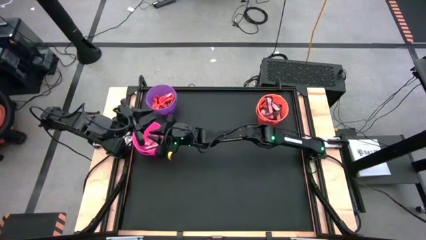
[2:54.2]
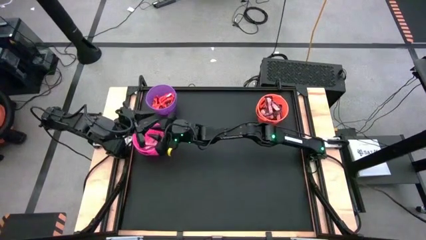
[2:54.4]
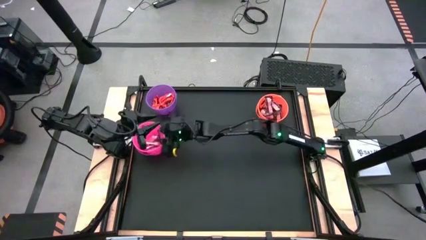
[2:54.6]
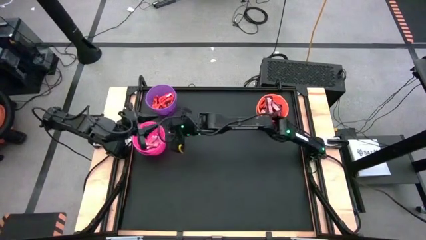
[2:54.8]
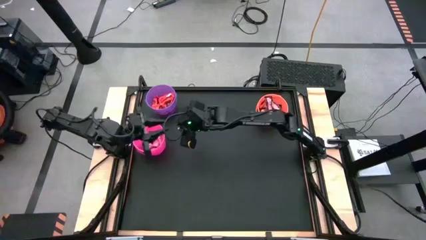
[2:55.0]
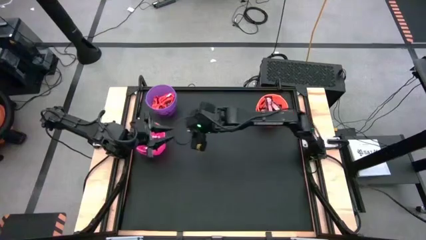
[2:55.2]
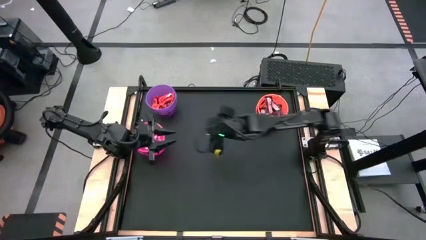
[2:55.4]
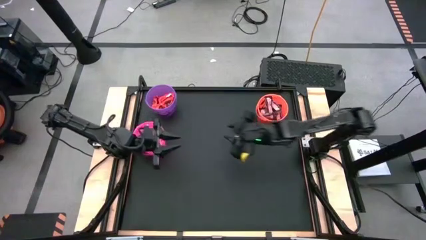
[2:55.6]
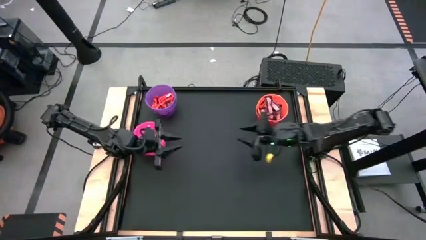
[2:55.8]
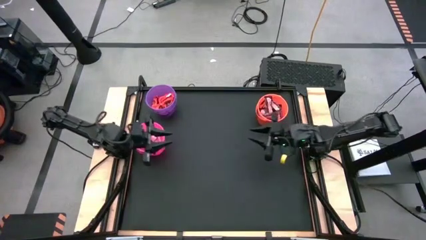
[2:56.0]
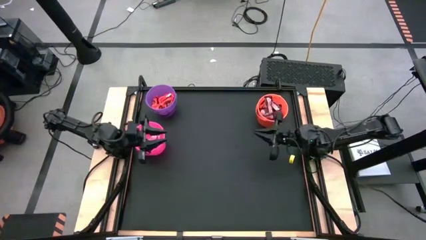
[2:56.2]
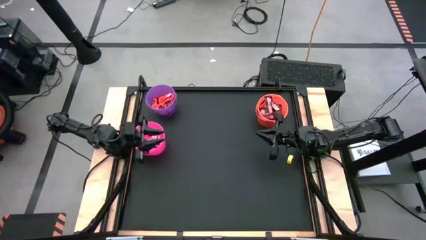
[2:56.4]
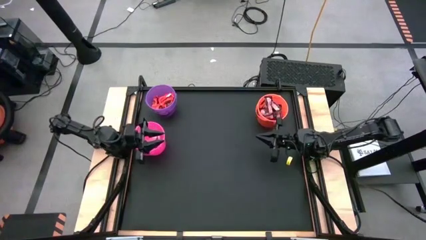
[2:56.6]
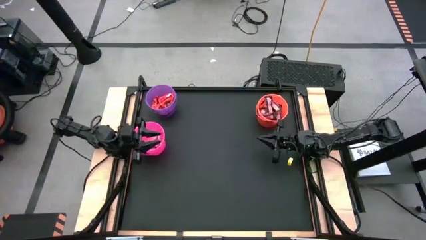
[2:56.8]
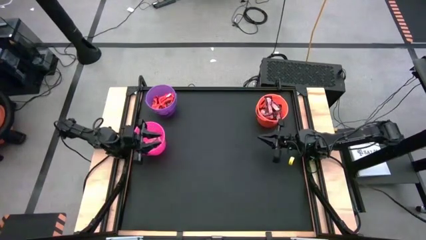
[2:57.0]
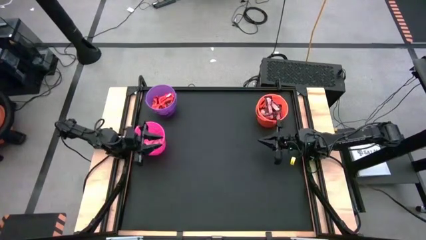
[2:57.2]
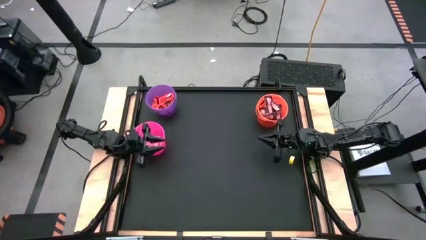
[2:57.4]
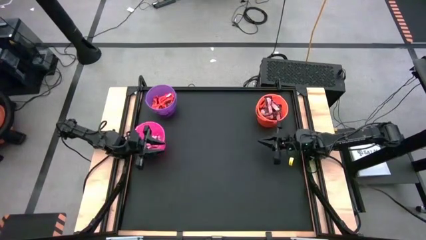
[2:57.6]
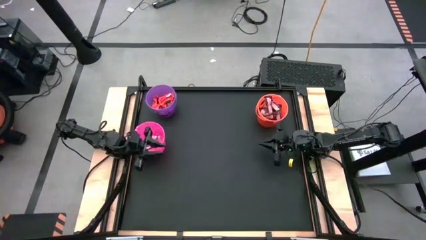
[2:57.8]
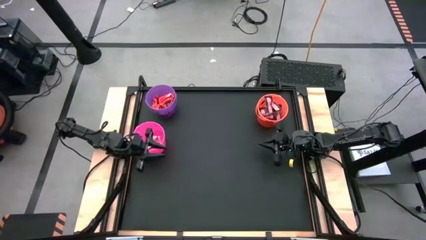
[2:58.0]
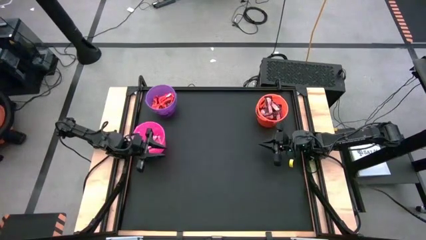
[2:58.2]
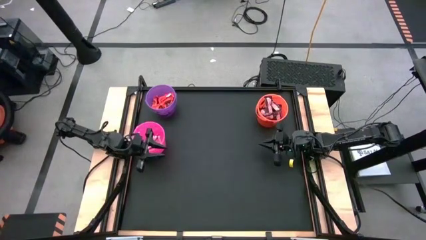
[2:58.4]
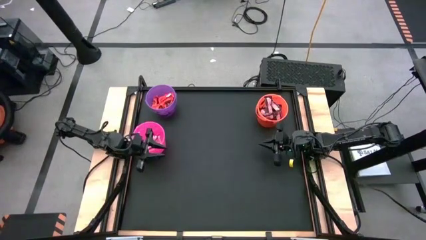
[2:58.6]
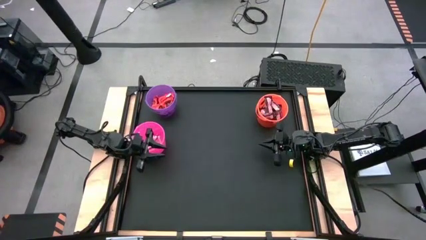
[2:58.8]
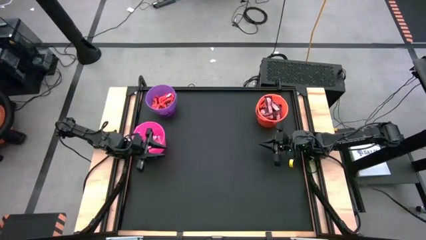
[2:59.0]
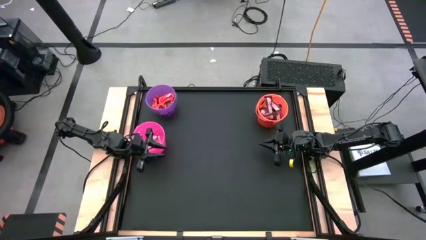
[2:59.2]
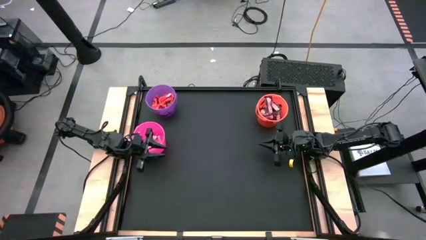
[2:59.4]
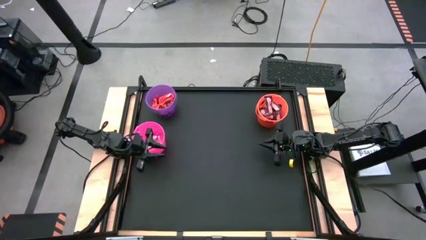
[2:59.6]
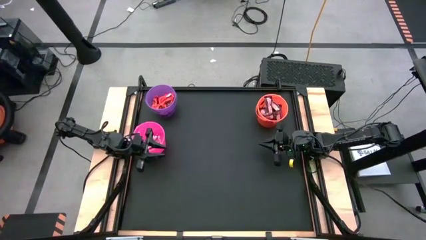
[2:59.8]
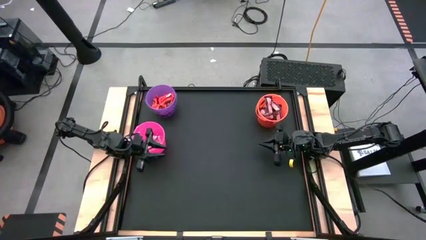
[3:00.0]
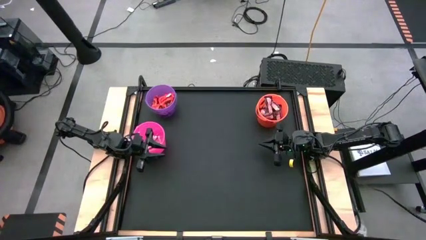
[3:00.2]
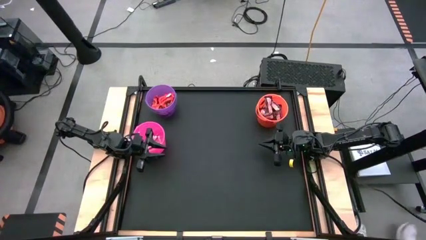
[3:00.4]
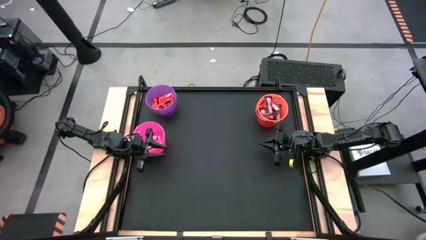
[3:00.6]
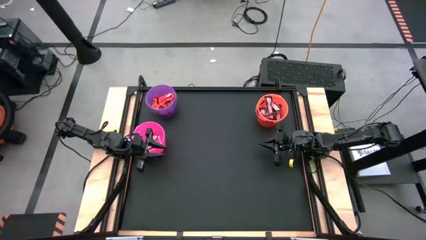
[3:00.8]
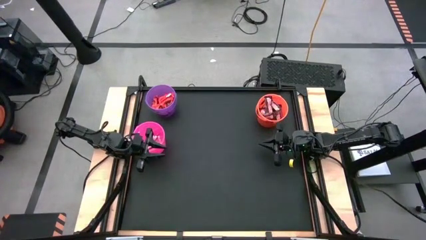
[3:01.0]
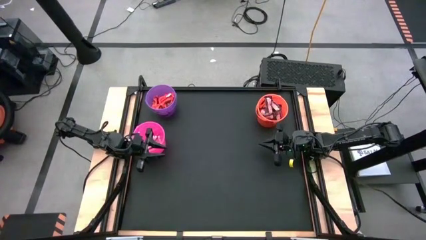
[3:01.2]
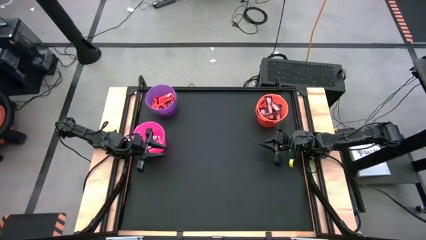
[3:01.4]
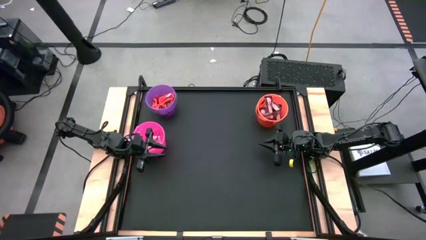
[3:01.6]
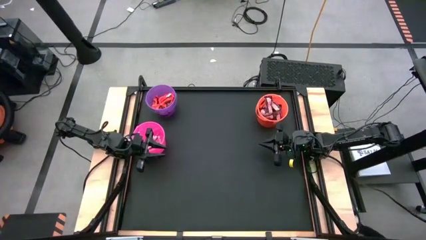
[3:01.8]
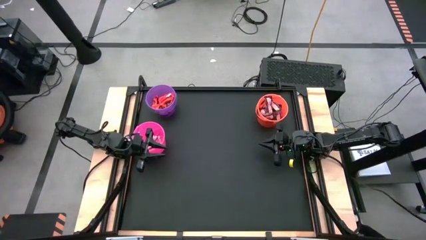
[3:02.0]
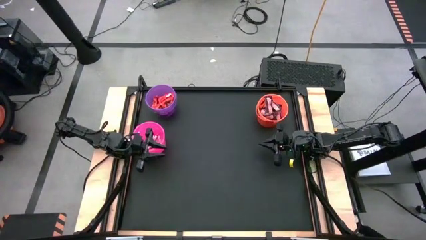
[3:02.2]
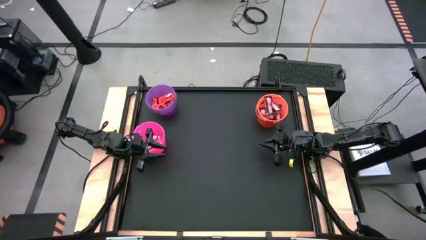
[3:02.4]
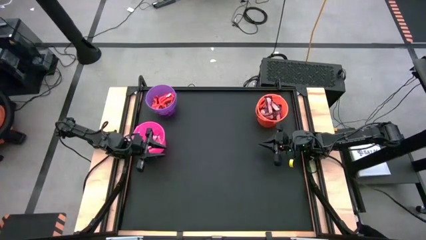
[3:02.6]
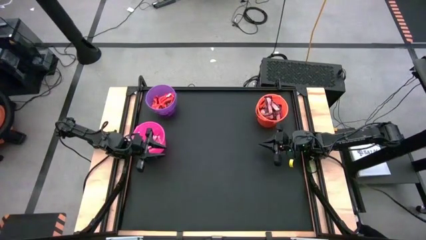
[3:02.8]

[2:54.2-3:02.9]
Task: Sort candy by brand, put in halloween buckets
Return to Home Position

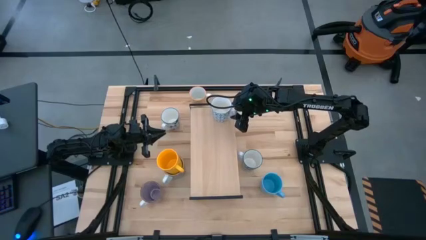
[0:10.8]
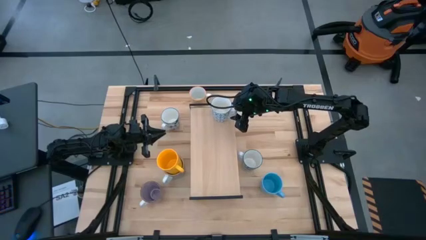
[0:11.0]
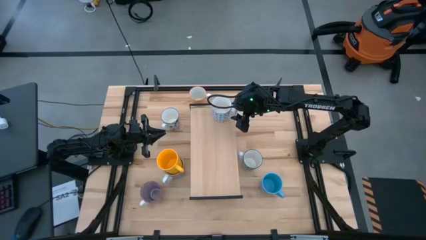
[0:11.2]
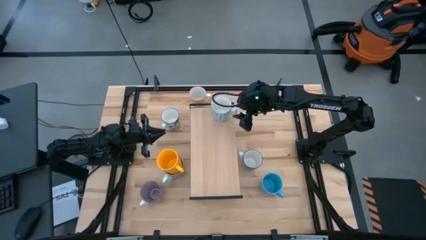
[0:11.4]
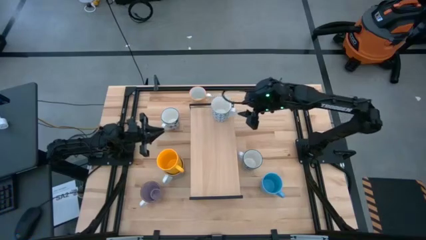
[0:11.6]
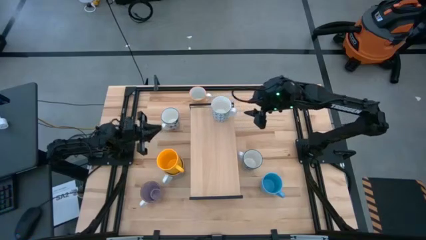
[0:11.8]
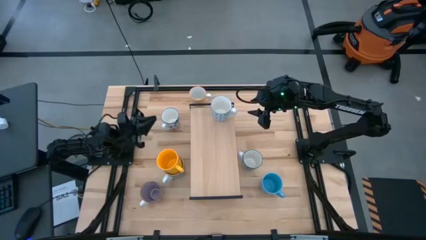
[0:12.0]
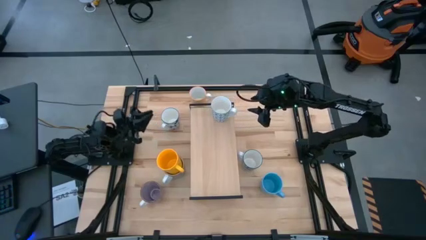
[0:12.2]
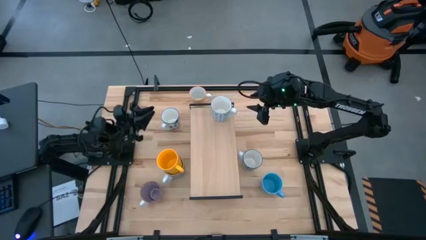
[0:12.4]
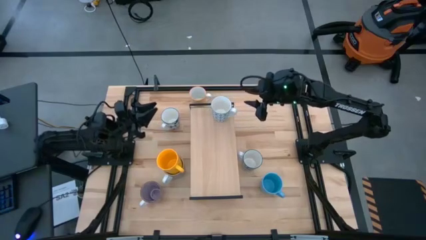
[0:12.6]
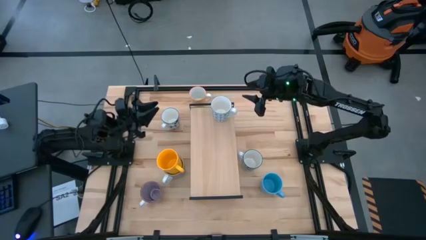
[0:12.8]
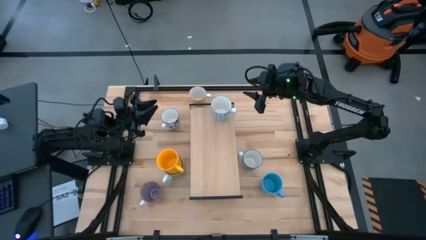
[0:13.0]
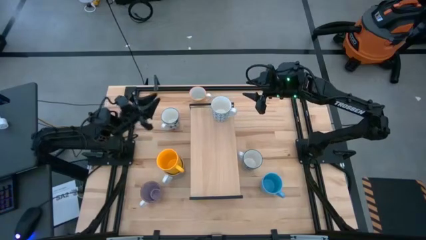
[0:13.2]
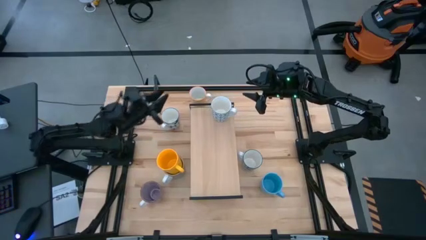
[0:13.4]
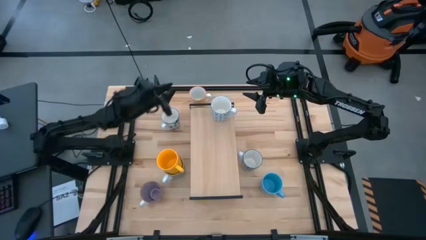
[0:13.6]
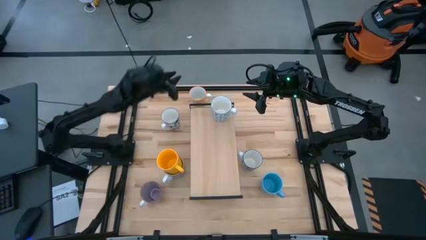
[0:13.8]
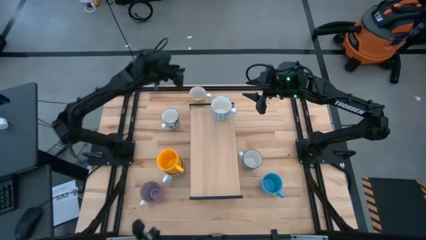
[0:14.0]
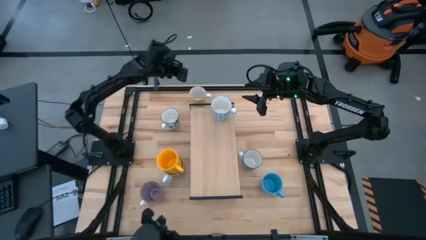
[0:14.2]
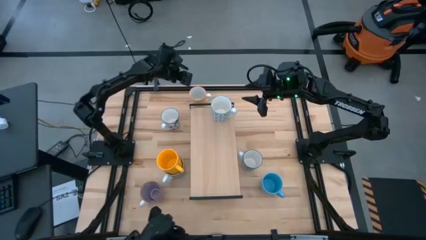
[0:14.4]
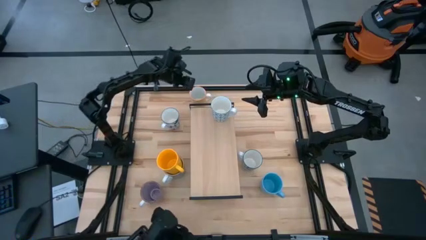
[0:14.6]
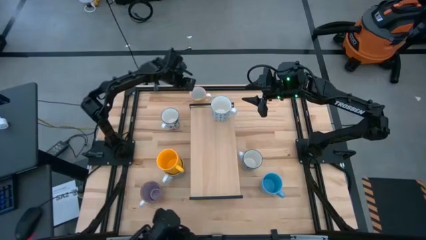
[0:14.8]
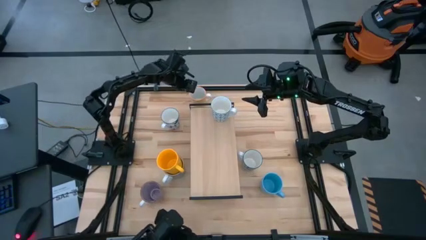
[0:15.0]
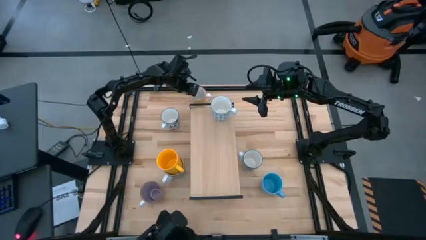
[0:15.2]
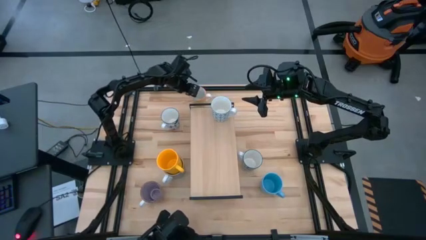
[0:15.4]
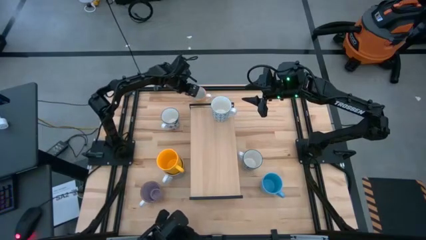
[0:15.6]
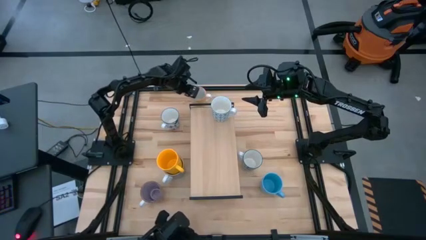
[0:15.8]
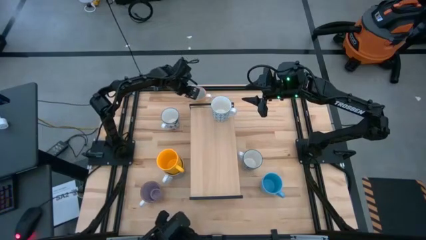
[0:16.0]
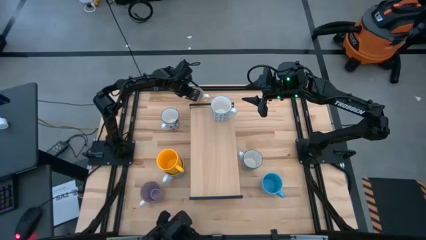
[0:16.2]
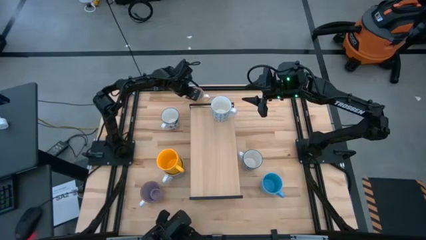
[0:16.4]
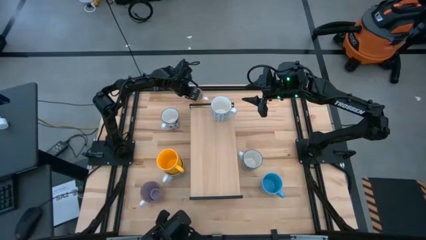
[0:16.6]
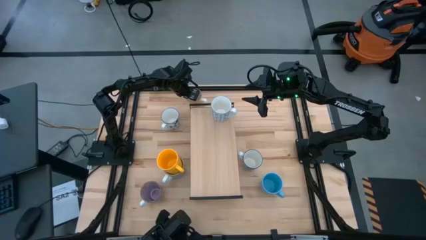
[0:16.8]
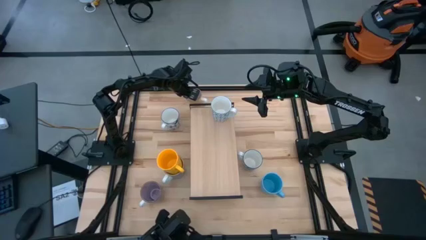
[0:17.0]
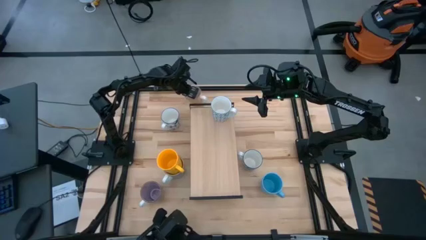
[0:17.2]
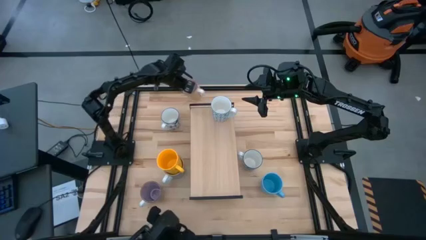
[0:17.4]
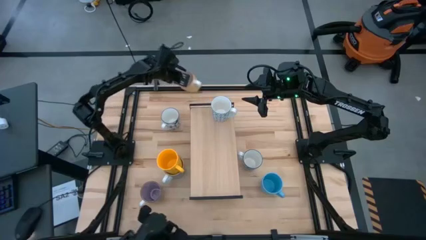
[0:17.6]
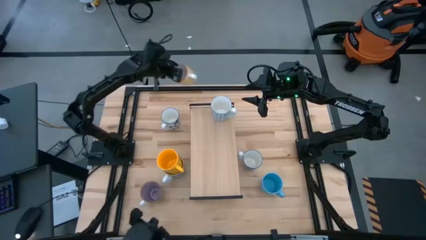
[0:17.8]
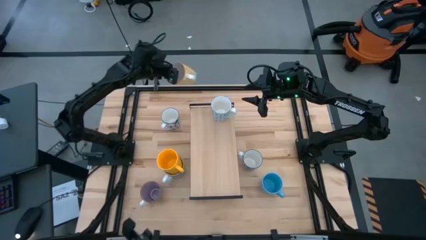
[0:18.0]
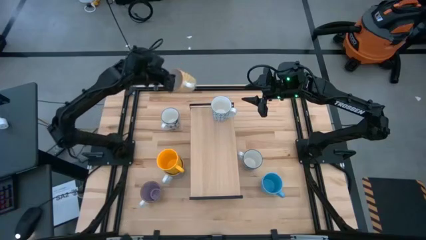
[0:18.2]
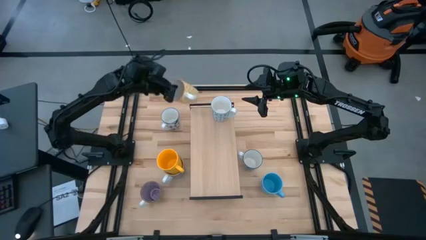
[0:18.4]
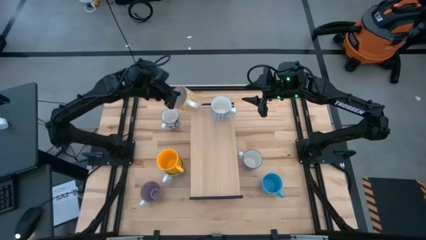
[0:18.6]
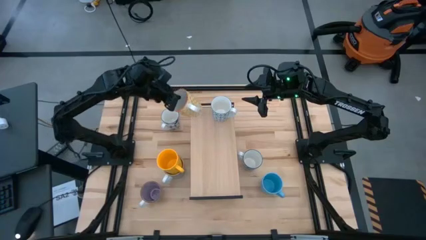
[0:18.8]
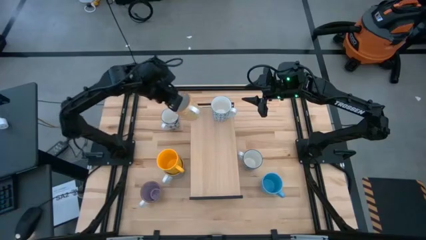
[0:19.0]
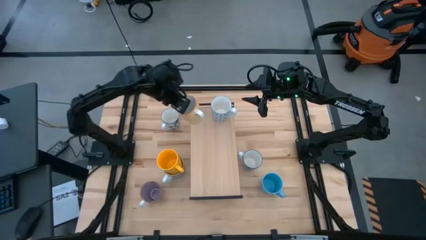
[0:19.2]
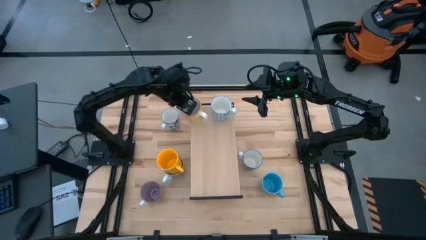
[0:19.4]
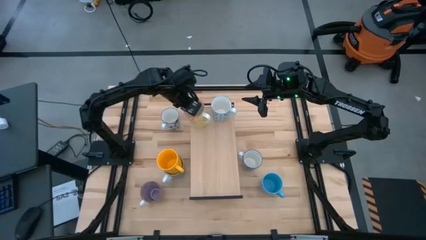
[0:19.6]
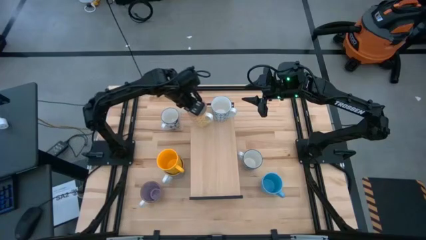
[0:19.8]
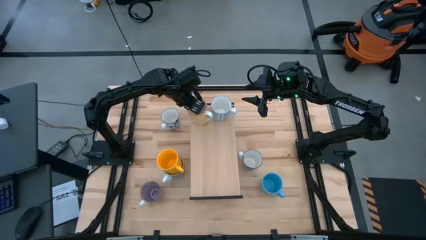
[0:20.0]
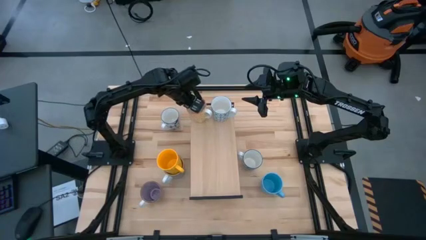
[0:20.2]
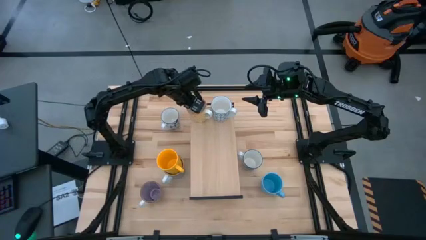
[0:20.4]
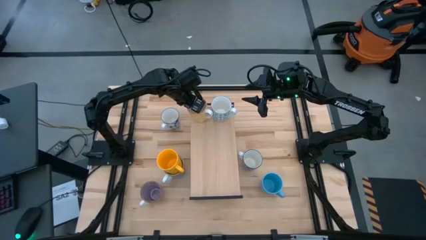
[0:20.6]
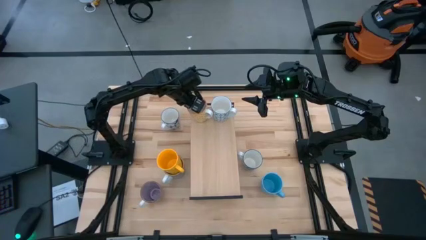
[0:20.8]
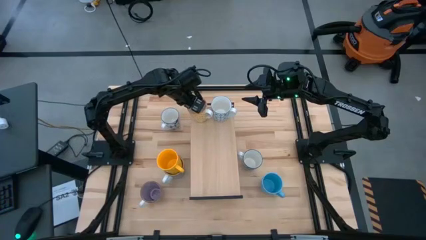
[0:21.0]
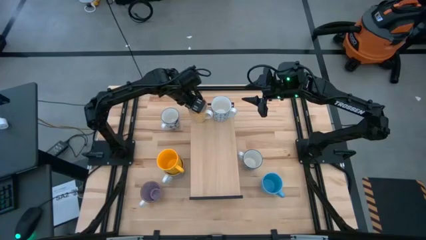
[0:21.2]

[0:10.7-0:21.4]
Task: Place coffee mugs
Put the yellow mug on the shelf
